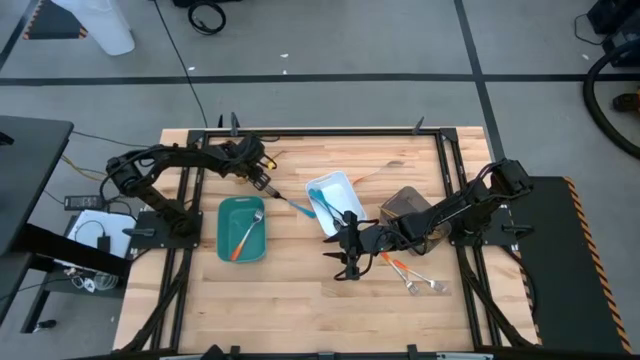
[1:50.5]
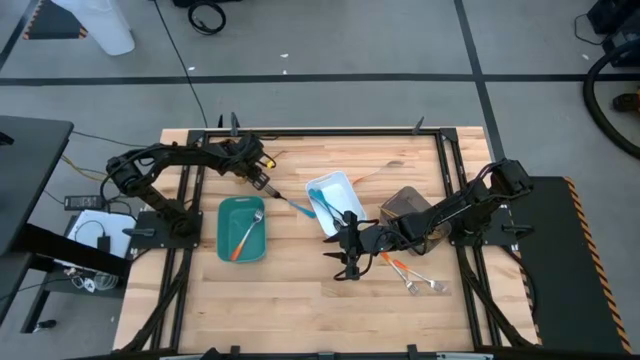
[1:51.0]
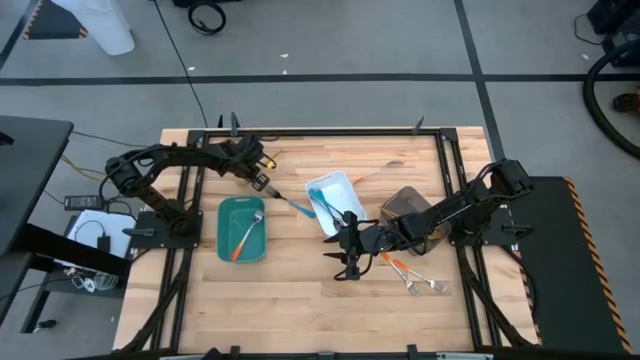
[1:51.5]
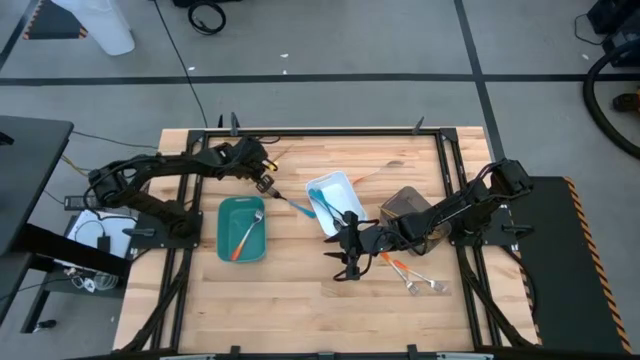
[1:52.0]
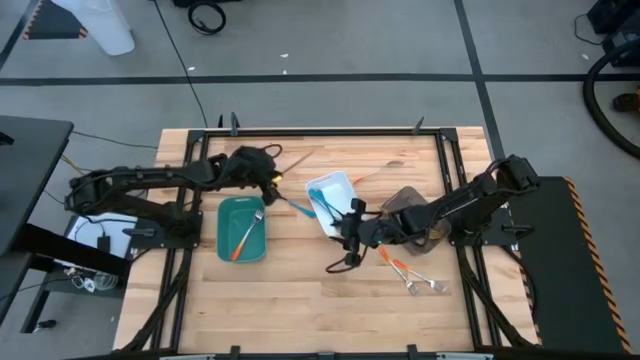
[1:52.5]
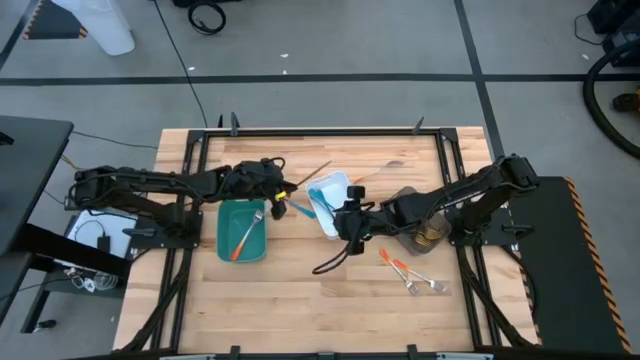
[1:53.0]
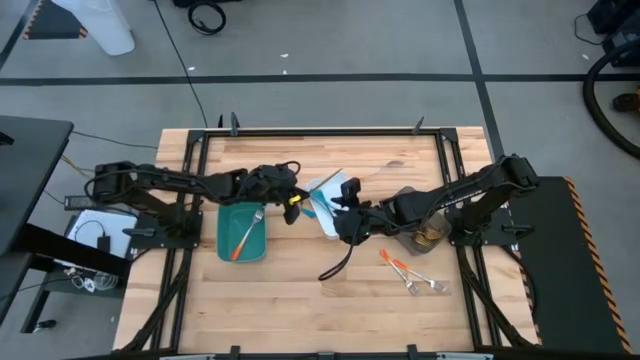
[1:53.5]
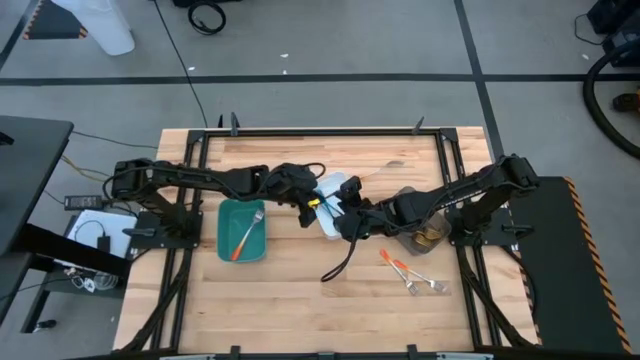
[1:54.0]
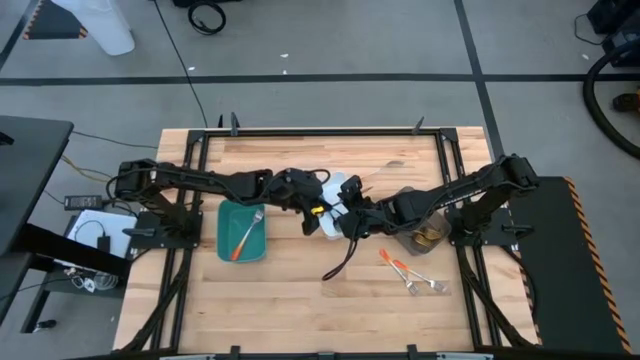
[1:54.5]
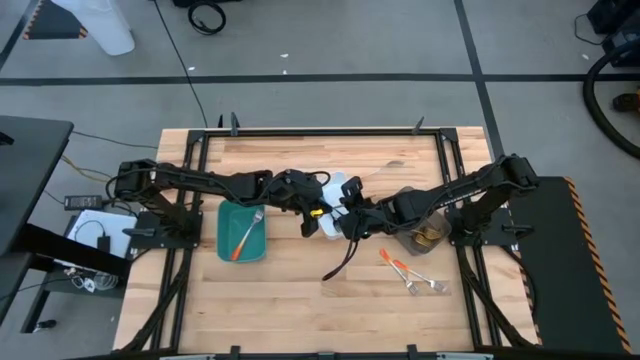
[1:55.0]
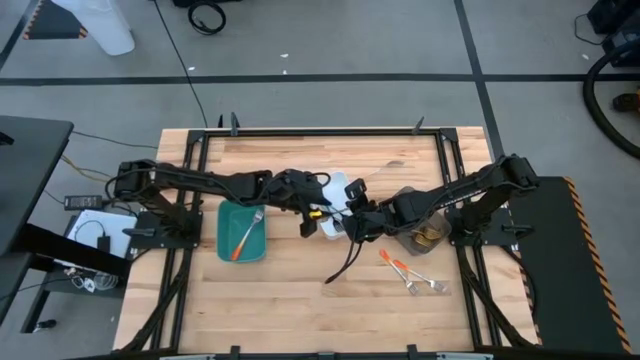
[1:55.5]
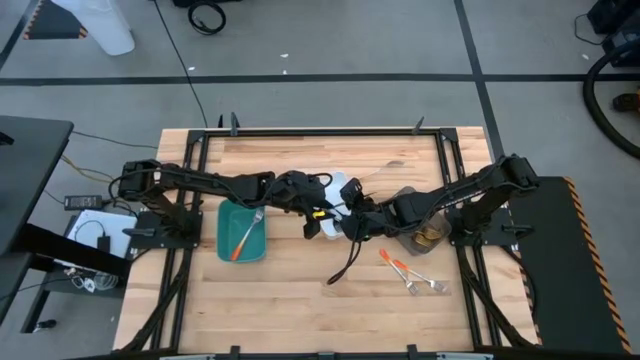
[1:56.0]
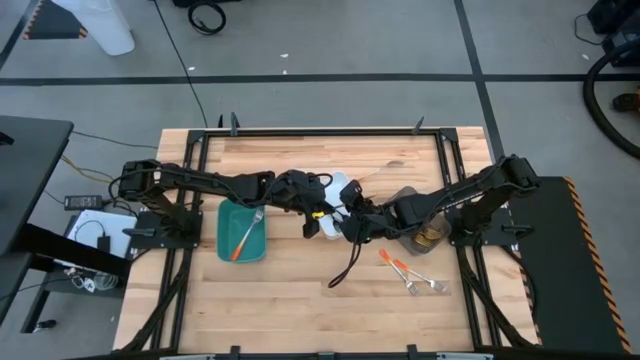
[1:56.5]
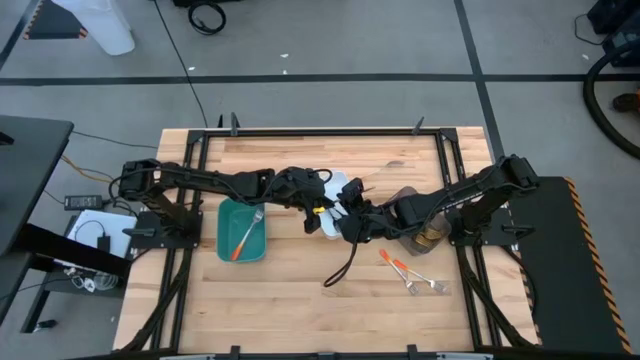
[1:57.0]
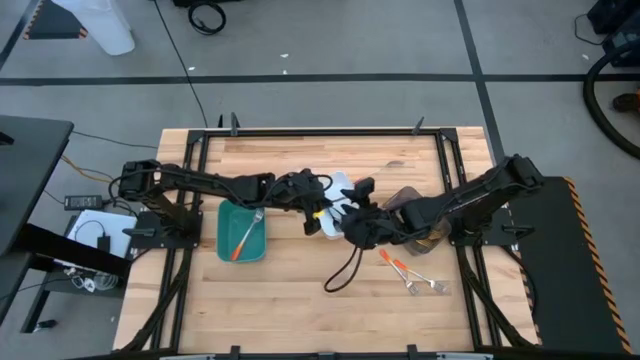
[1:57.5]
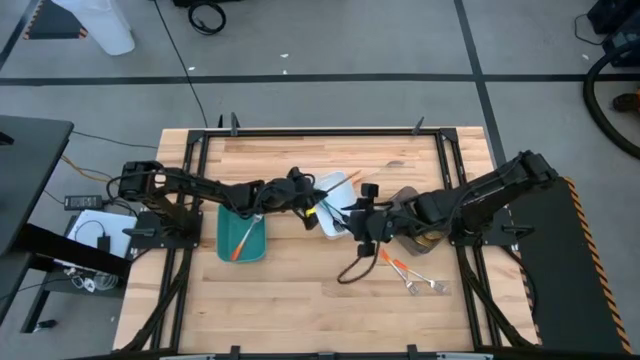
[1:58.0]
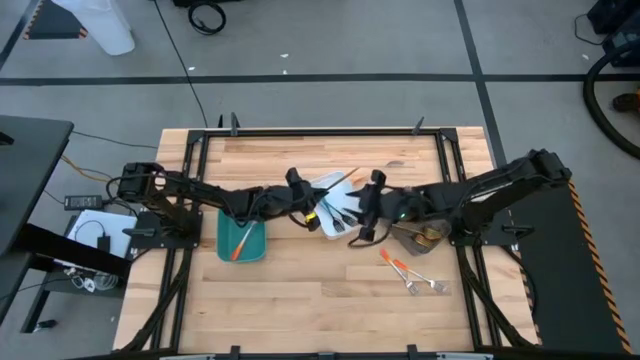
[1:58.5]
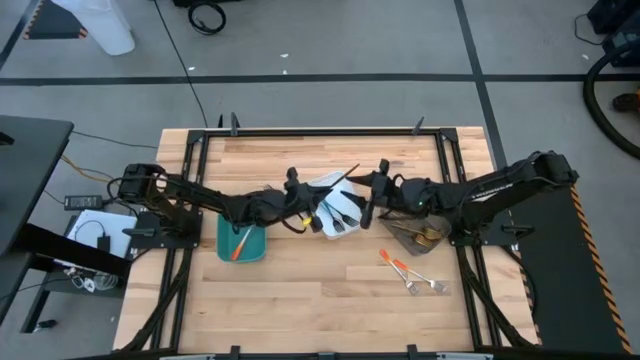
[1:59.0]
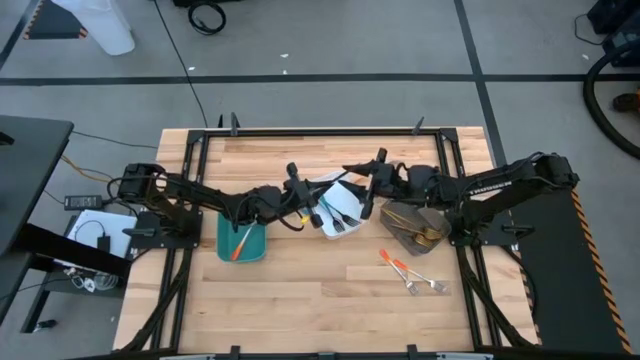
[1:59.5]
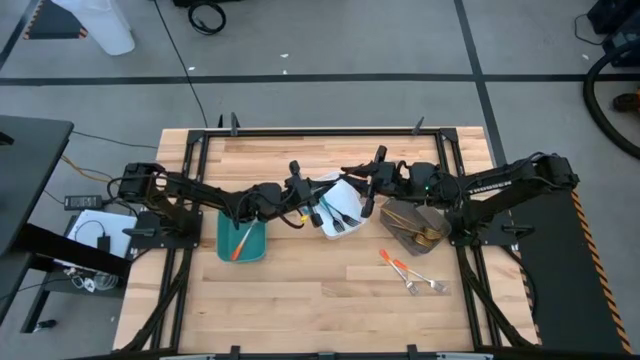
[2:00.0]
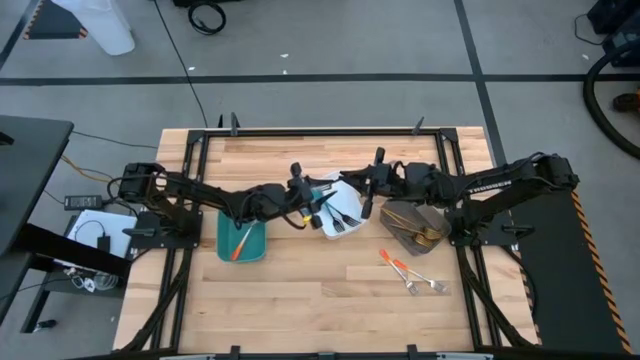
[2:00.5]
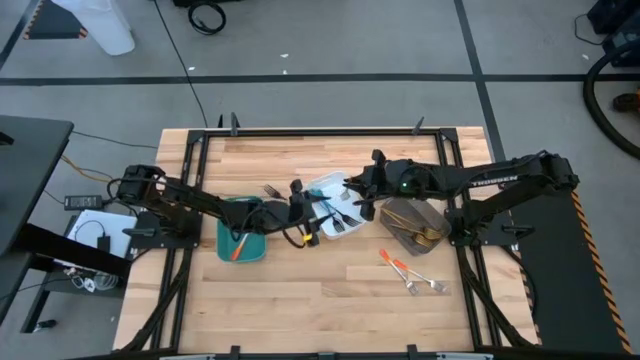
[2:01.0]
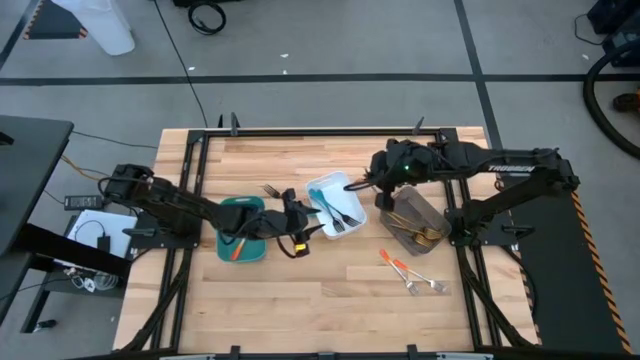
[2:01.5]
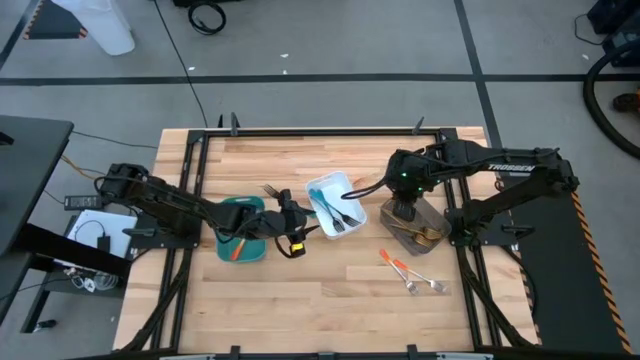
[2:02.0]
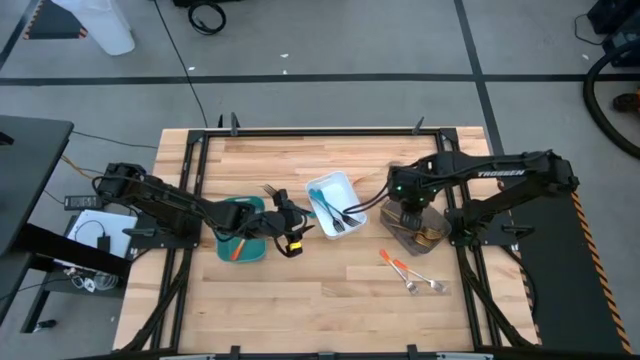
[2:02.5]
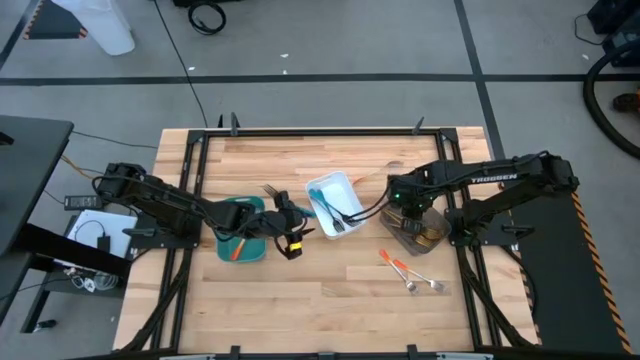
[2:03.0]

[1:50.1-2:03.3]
Task: Sort silverware by color (type)
Put the gold fork into the black bin

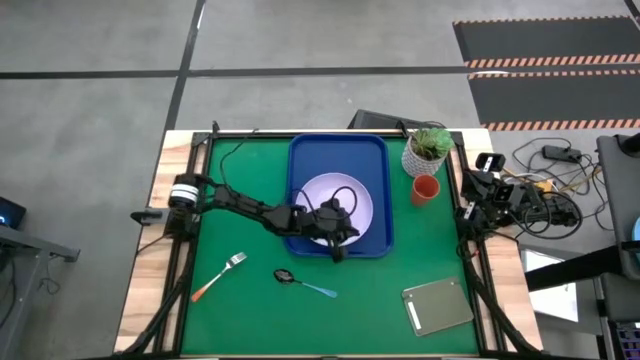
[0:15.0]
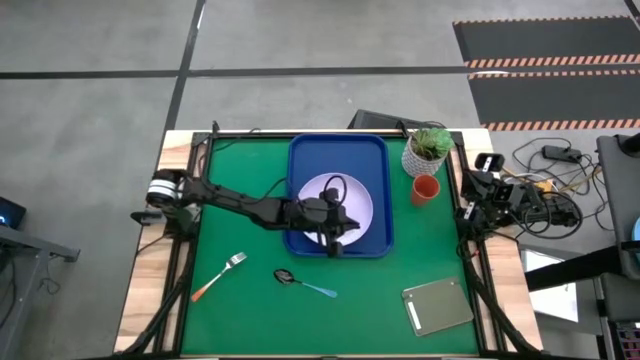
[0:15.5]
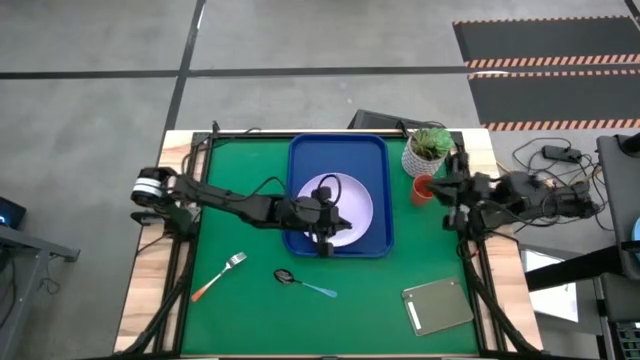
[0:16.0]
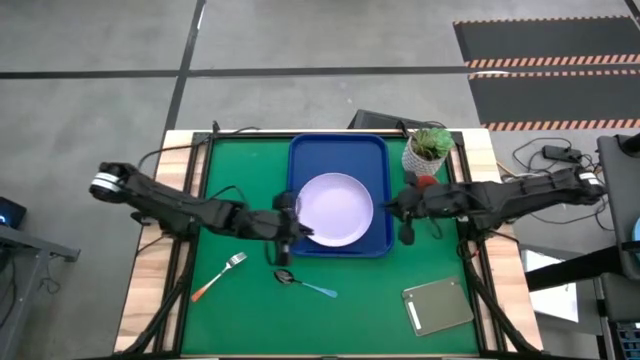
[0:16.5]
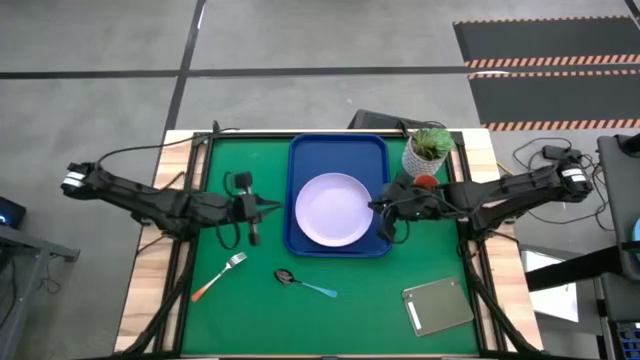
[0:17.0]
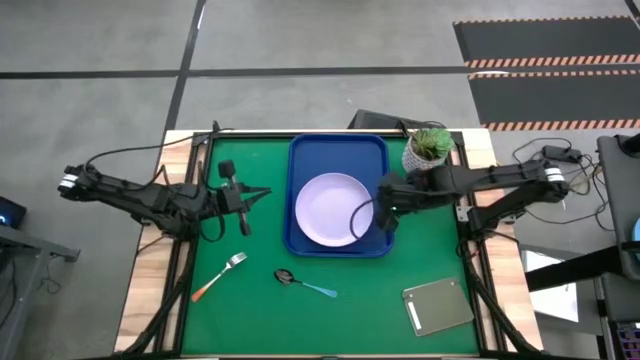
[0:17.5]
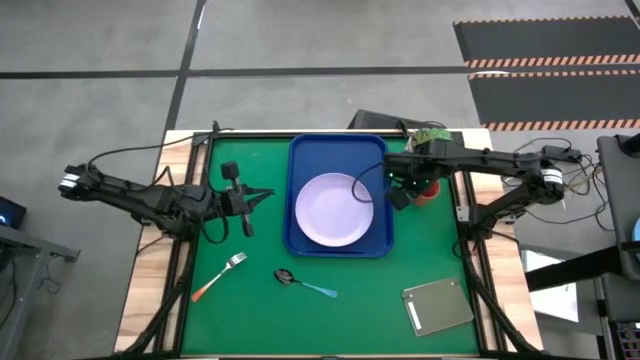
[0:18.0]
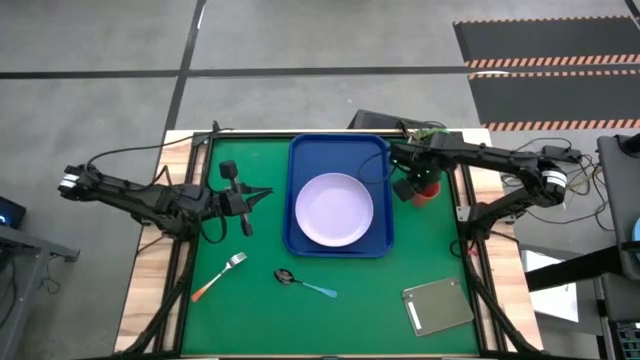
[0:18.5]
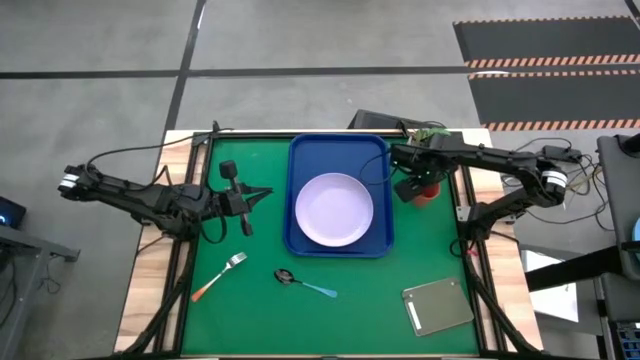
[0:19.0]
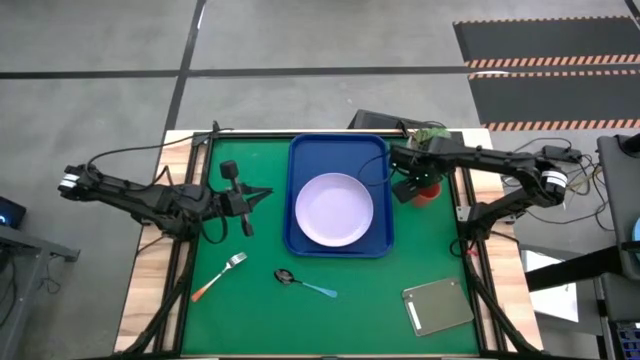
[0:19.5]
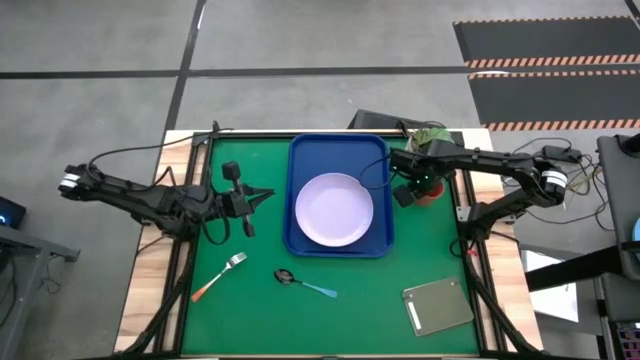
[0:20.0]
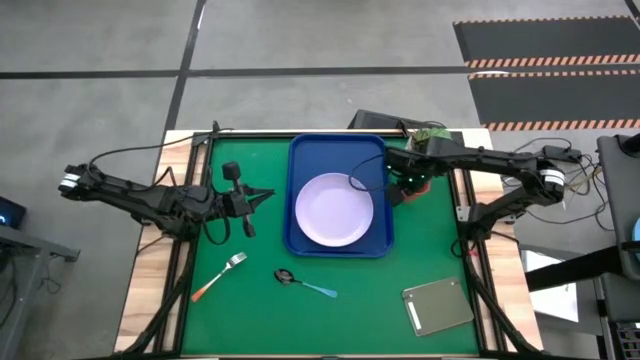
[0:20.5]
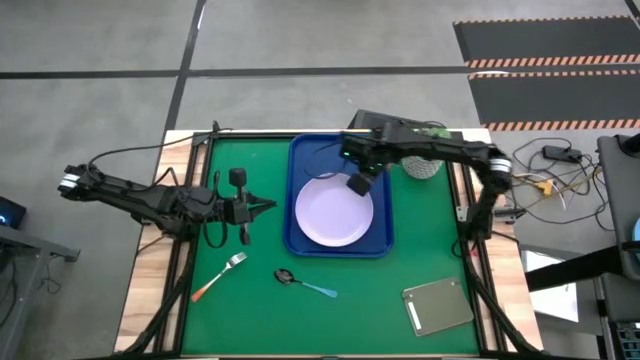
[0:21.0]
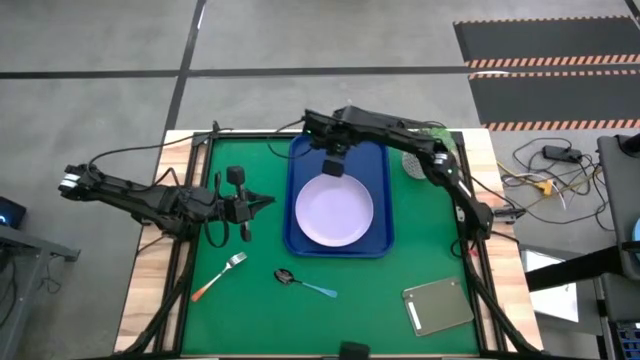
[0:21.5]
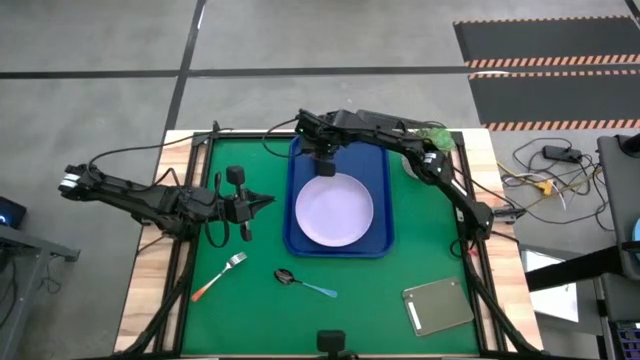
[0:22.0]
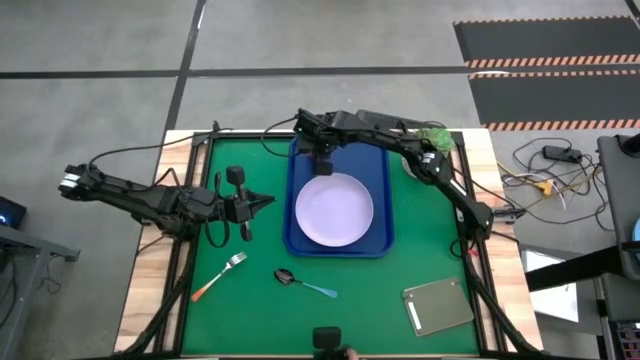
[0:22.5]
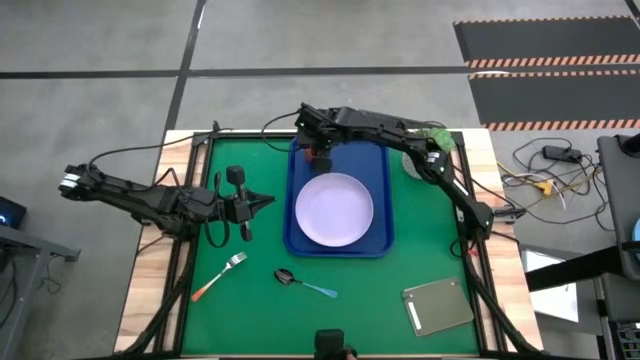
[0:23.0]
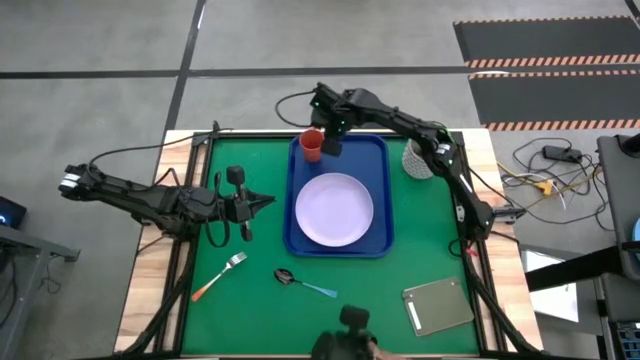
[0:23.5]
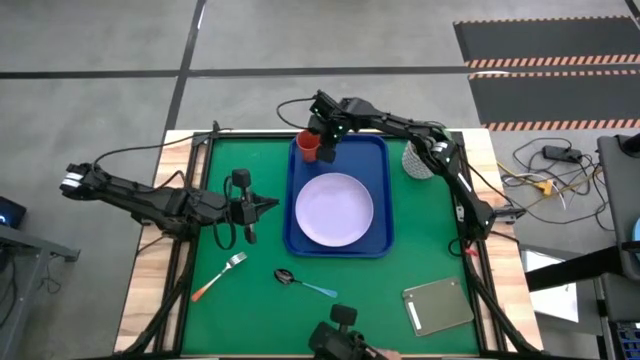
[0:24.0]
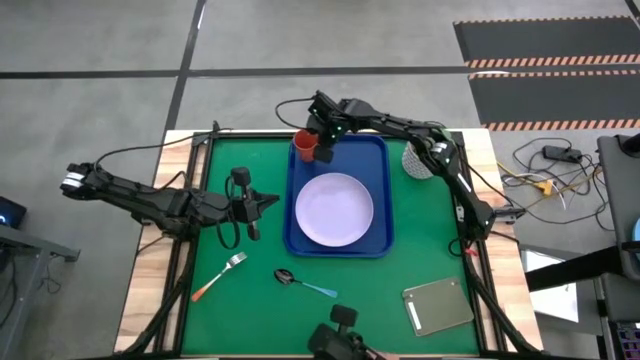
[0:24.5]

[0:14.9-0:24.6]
Task: Pick and place plate/cup/fork/spoon on tray
Put the orange cup on the blue tray to the top right of the white plate
